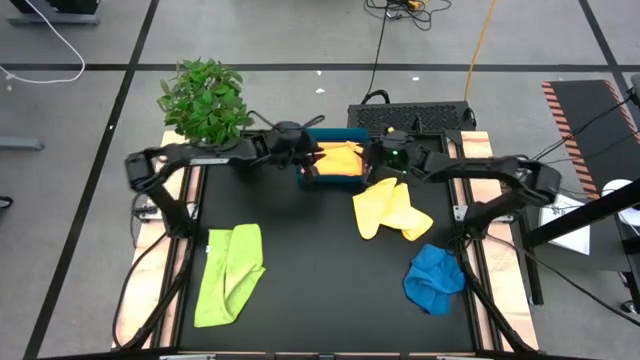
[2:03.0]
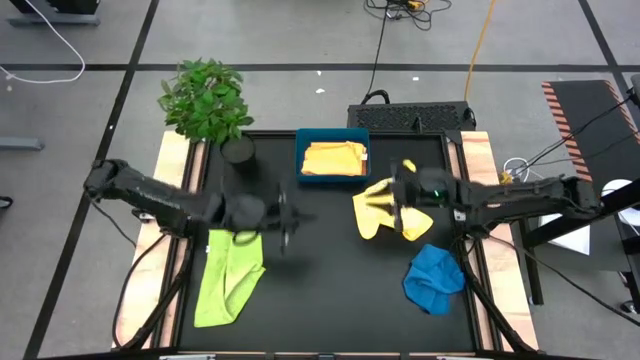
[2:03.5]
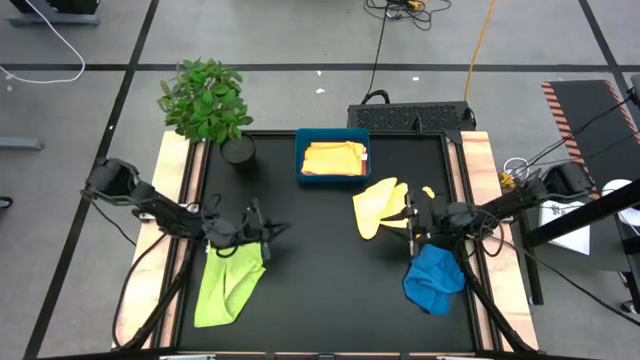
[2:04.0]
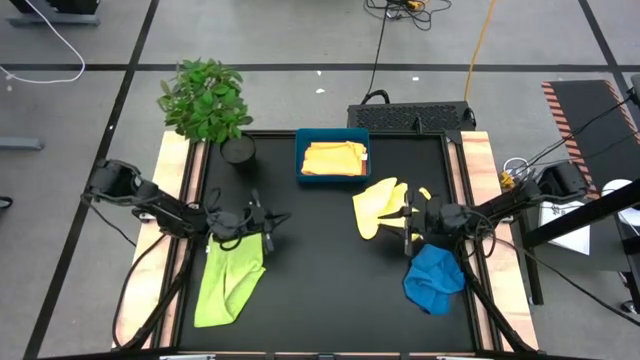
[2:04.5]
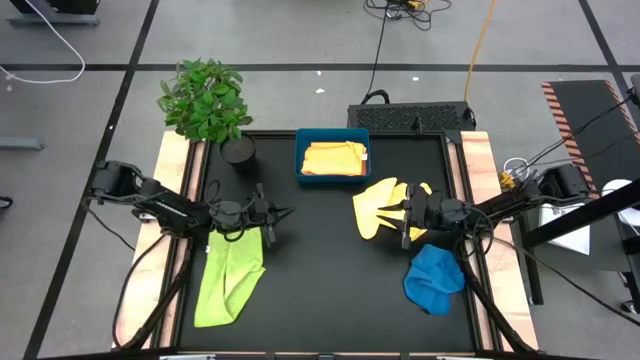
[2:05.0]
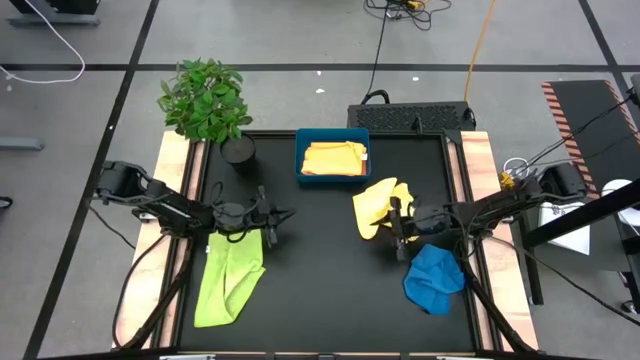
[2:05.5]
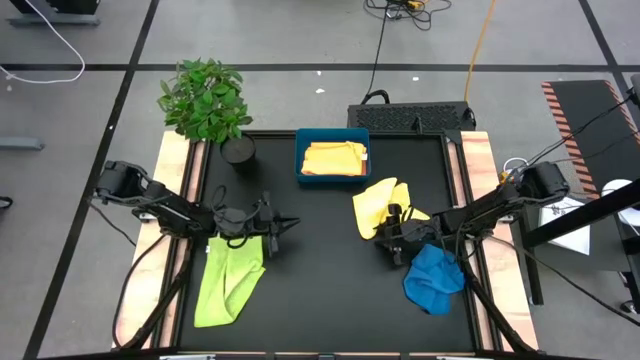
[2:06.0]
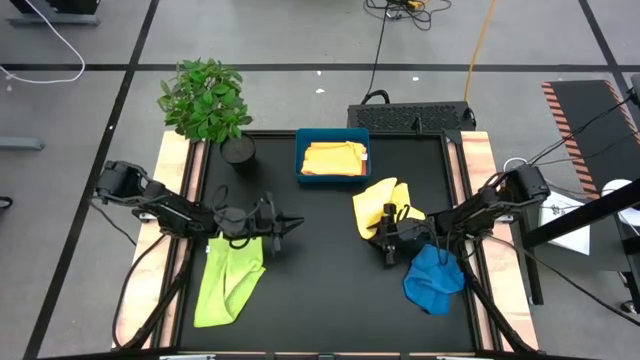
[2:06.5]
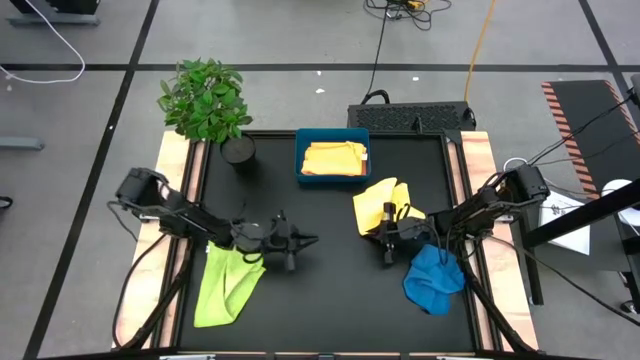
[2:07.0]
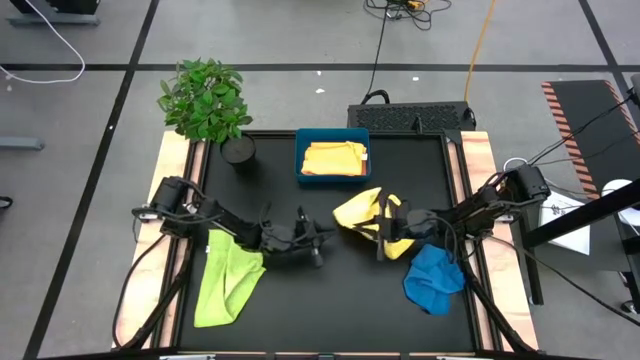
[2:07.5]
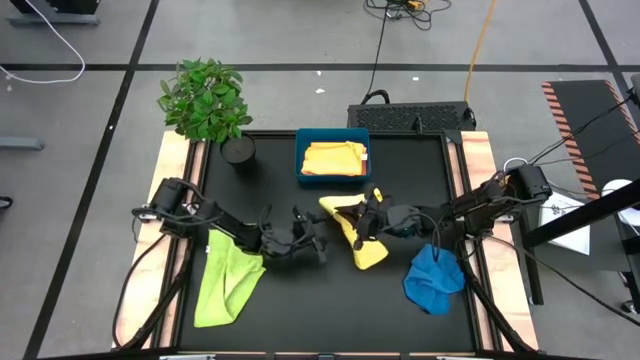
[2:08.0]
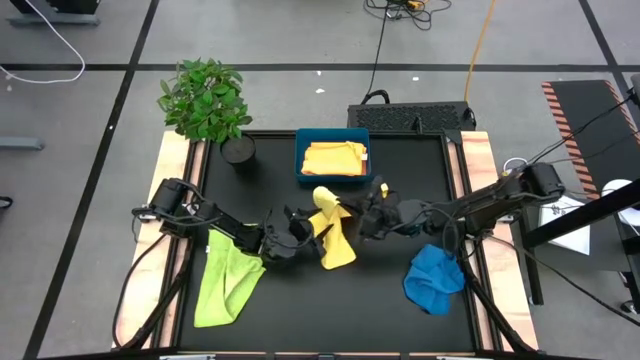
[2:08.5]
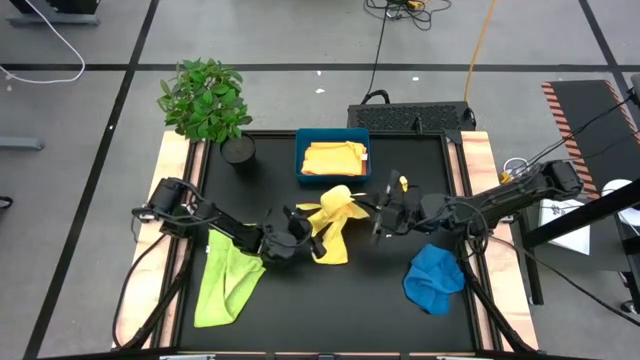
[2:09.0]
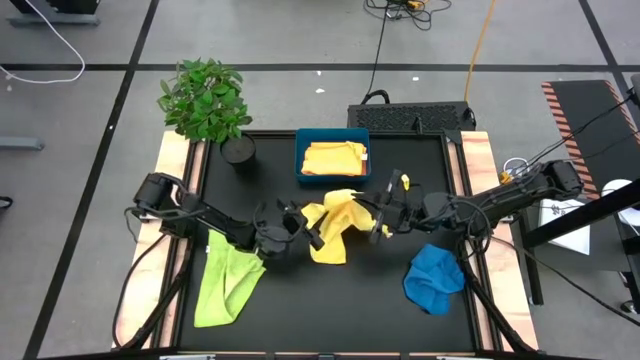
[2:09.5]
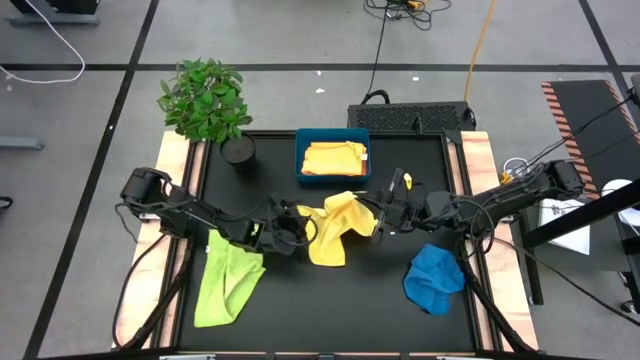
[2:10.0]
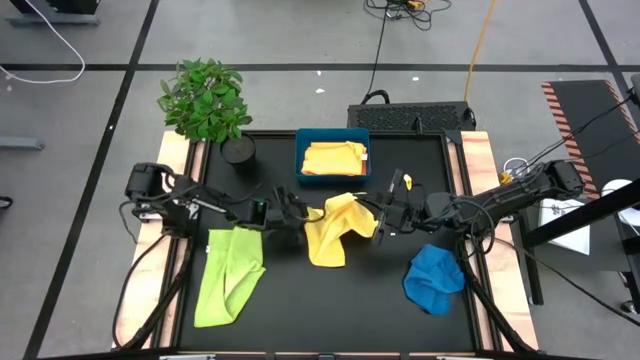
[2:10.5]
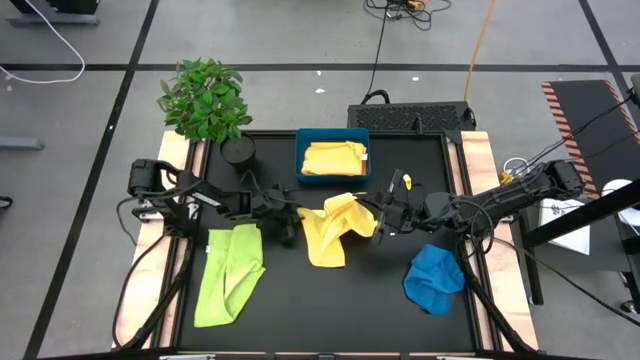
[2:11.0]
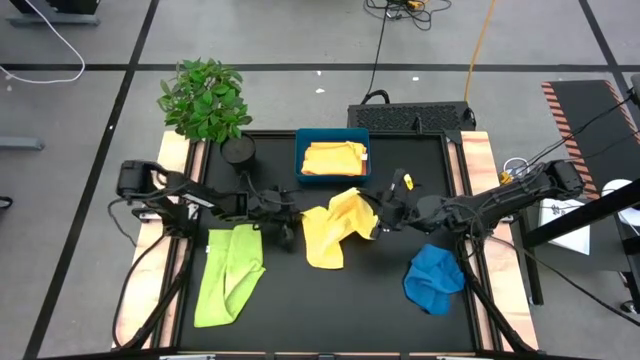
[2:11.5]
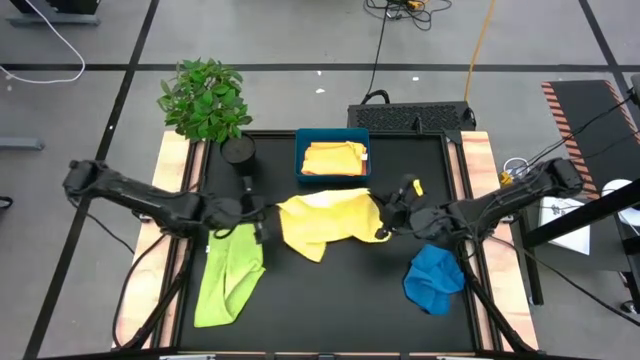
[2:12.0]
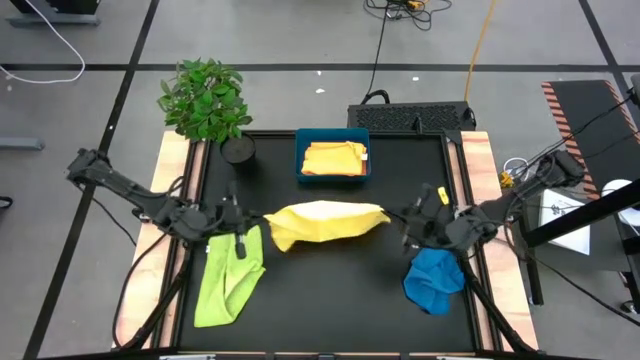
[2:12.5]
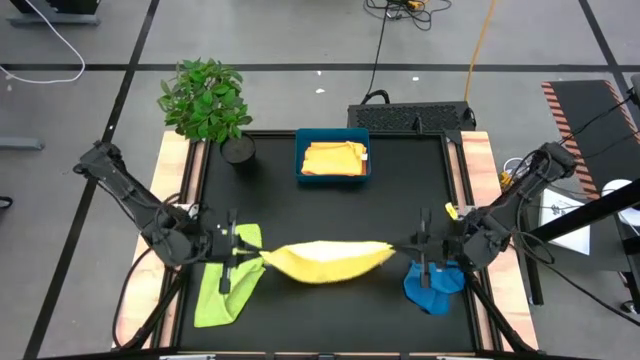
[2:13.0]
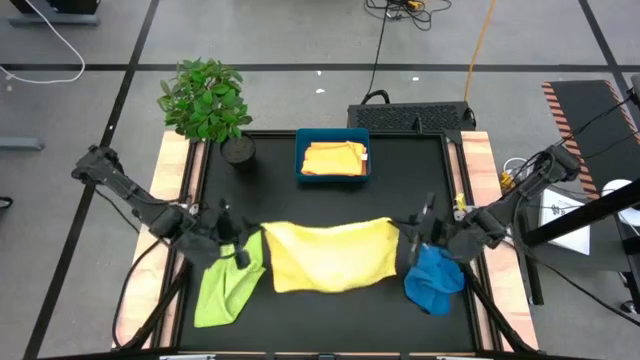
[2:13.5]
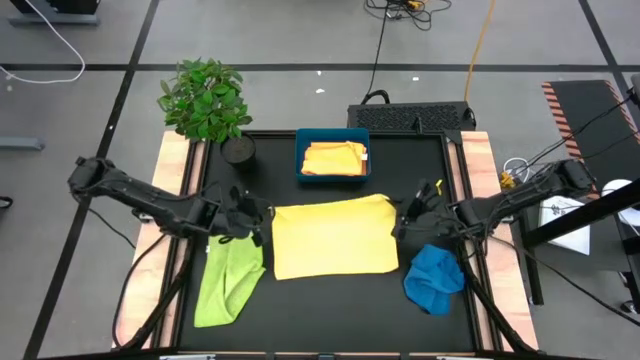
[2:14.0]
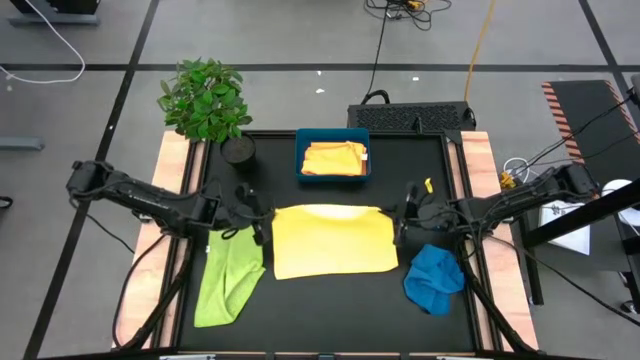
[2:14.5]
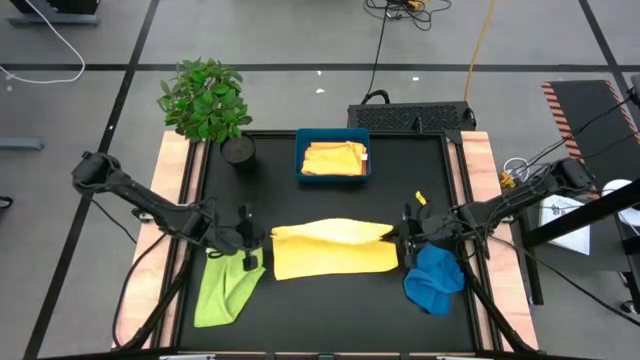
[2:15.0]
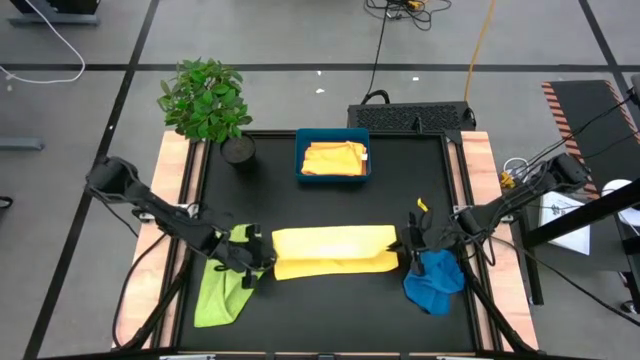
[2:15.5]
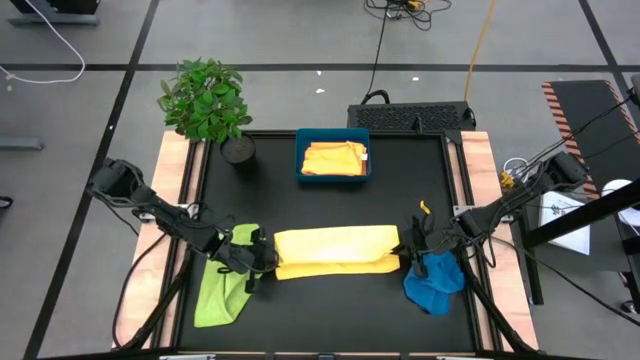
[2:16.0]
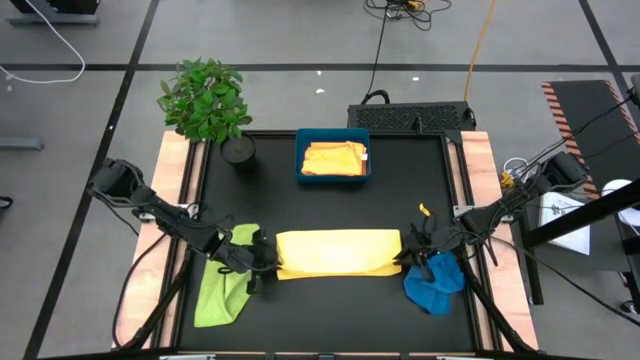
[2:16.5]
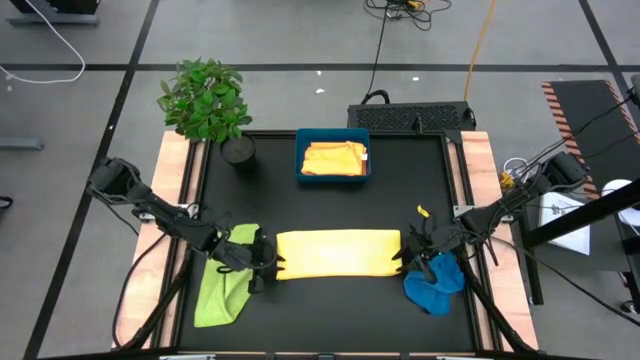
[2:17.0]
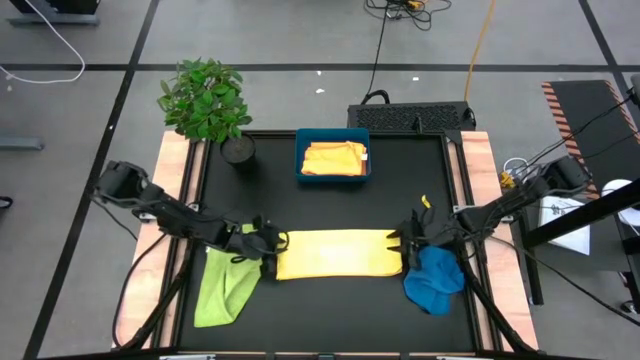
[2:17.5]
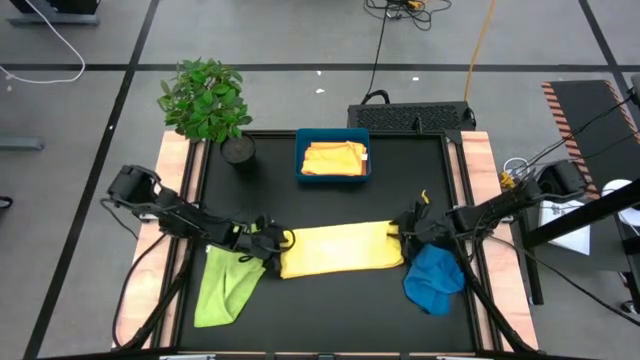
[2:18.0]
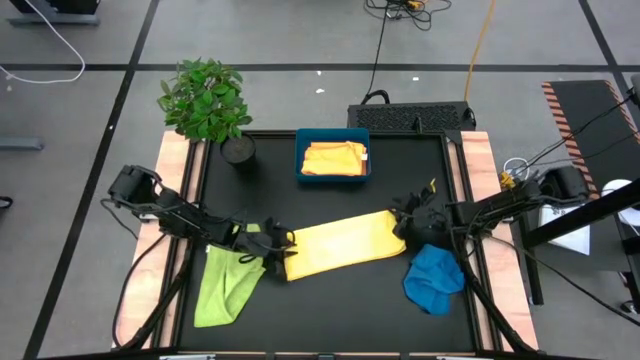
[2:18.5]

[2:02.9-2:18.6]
Task: Fold microfiber towels
Fold the yellow microfiber towel

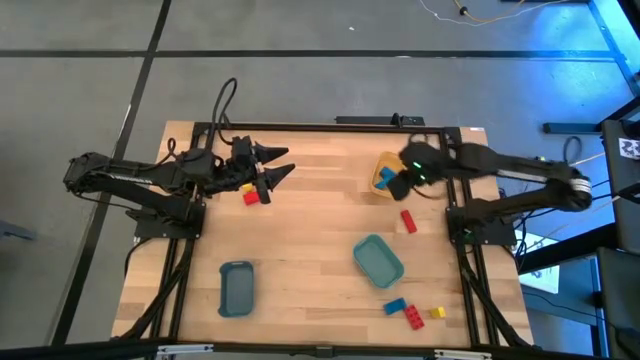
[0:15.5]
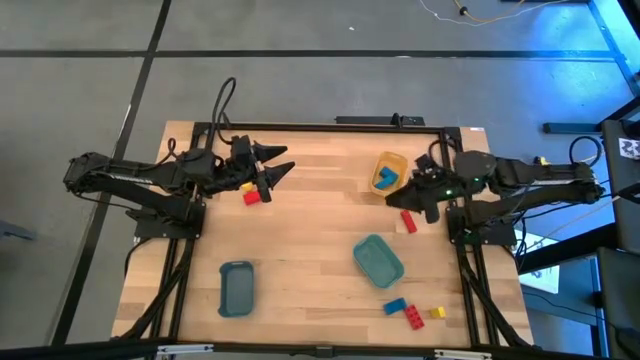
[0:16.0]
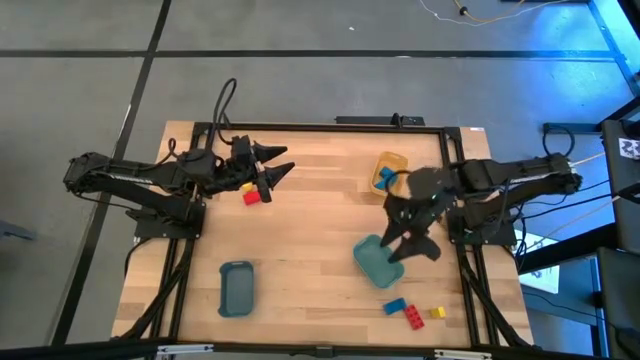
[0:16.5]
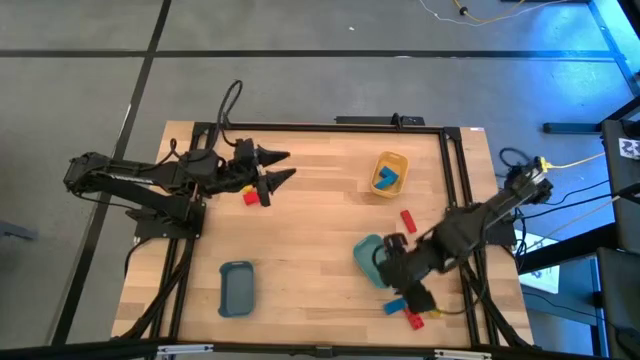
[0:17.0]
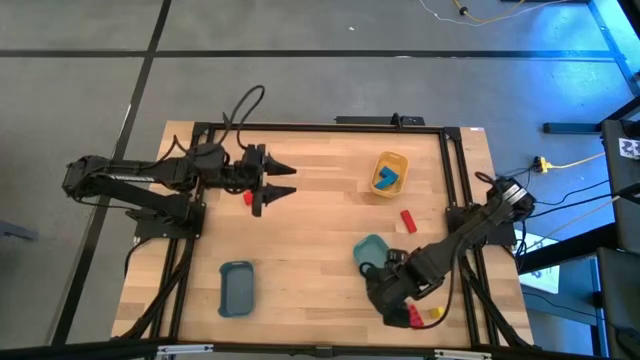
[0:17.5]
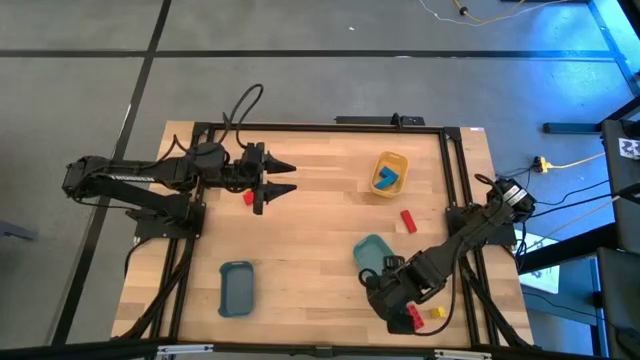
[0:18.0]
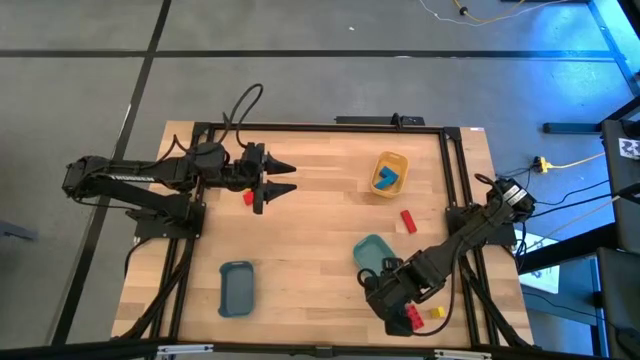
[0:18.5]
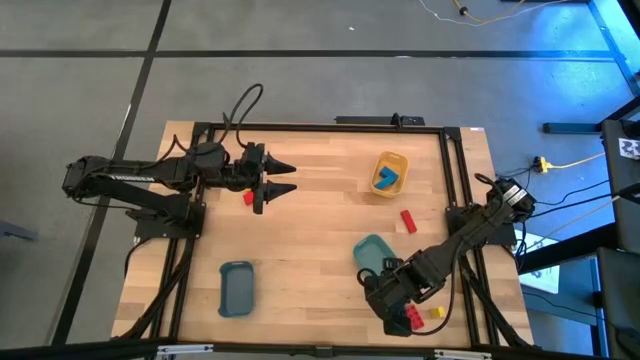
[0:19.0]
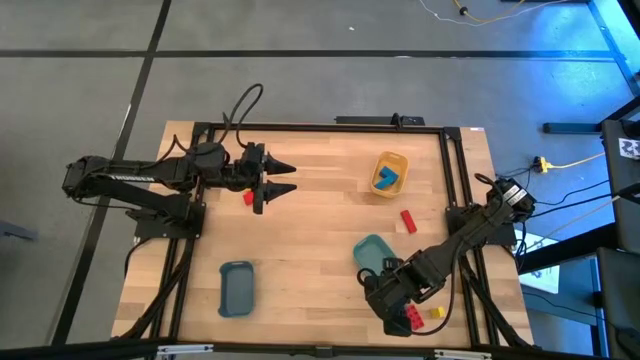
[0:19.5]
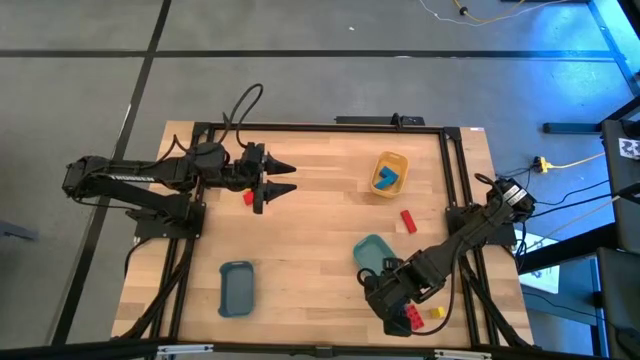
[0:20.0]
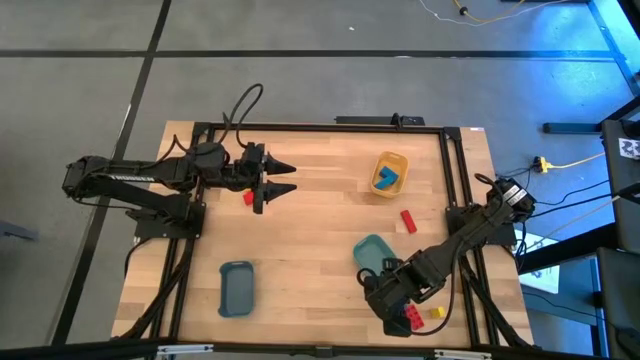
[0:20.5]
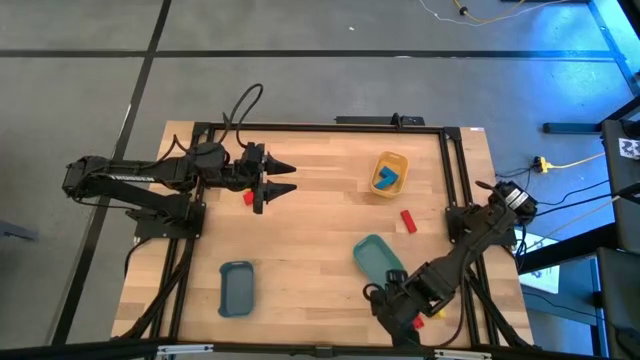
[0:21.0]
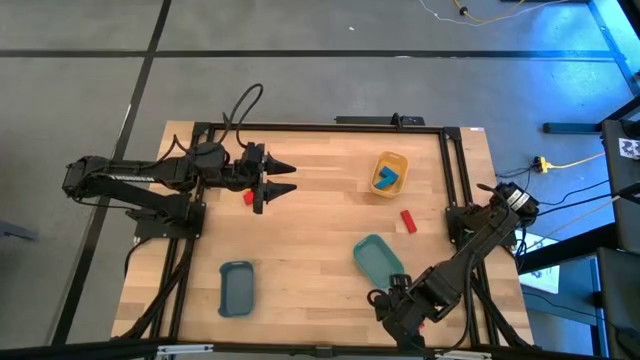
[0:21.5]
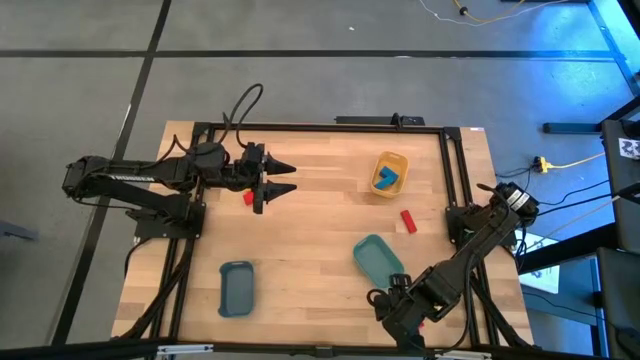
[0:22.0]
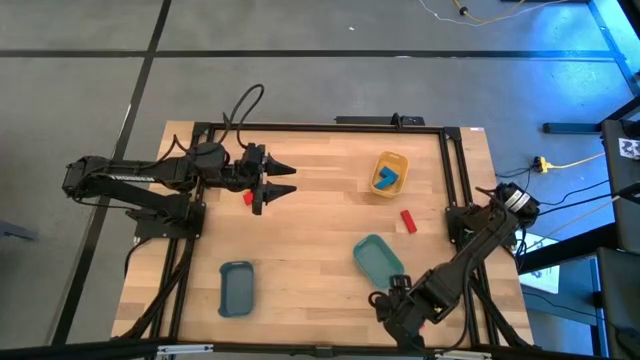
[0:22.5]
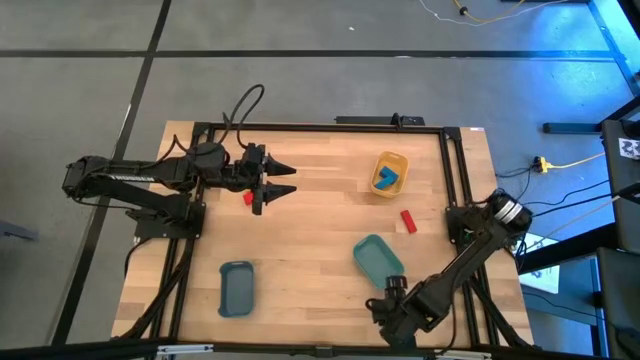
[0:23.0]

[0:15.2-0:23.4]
Task: Sort & place blocks by color
Put the blue block into the yellow bin
